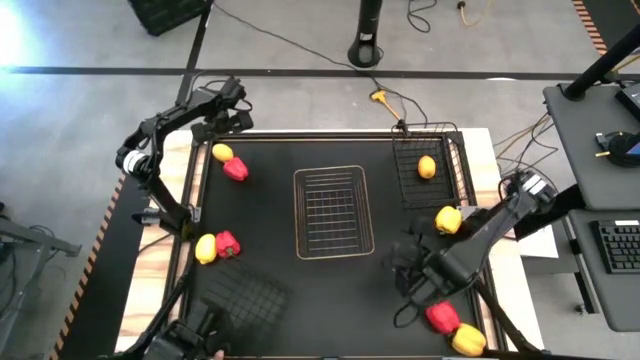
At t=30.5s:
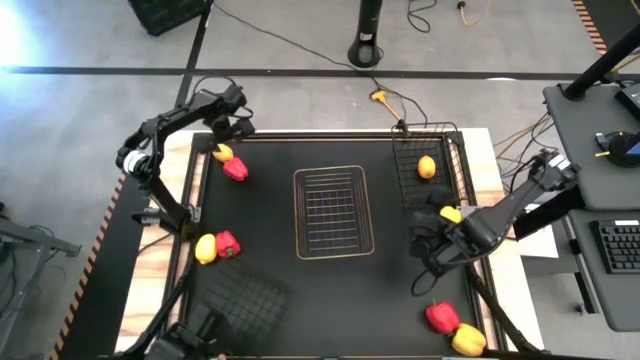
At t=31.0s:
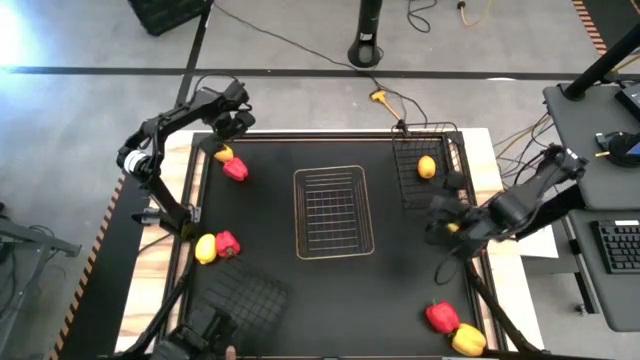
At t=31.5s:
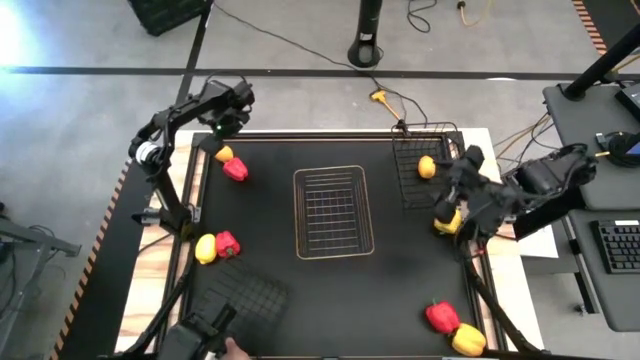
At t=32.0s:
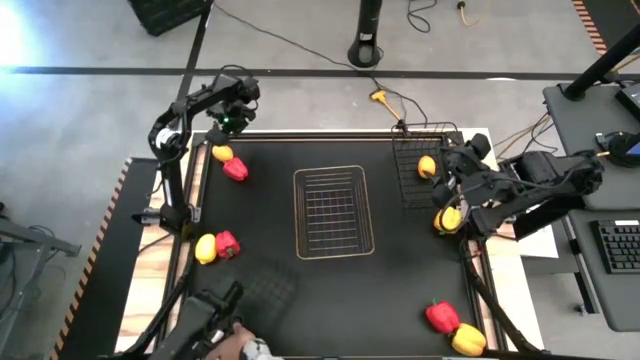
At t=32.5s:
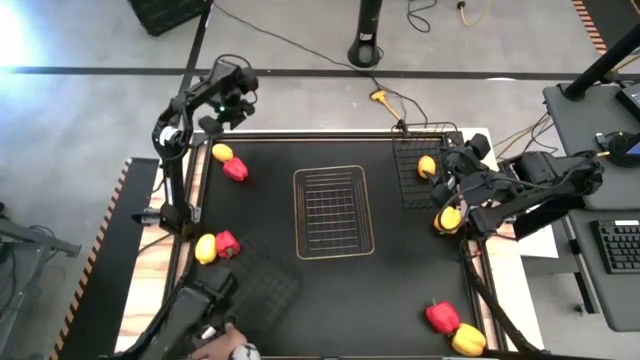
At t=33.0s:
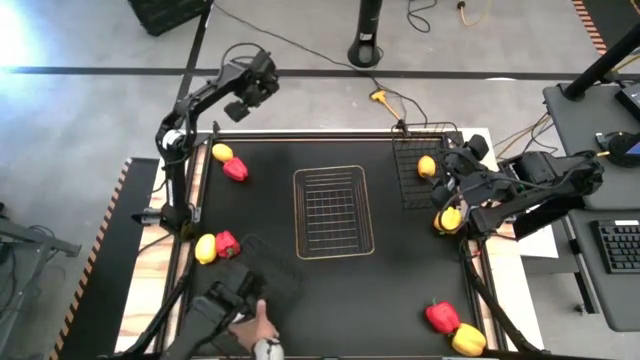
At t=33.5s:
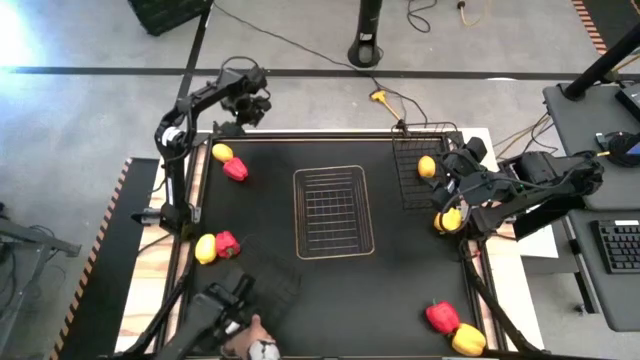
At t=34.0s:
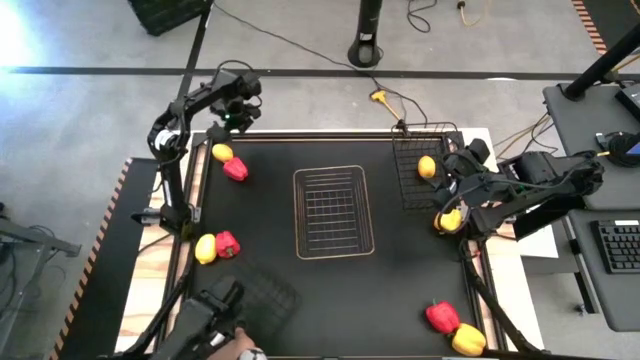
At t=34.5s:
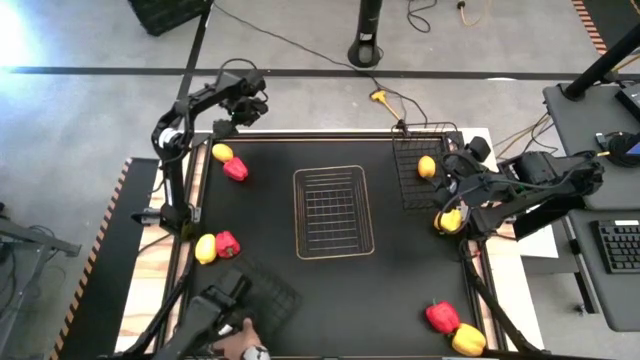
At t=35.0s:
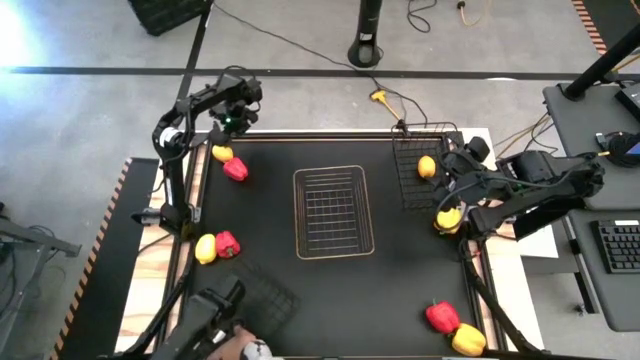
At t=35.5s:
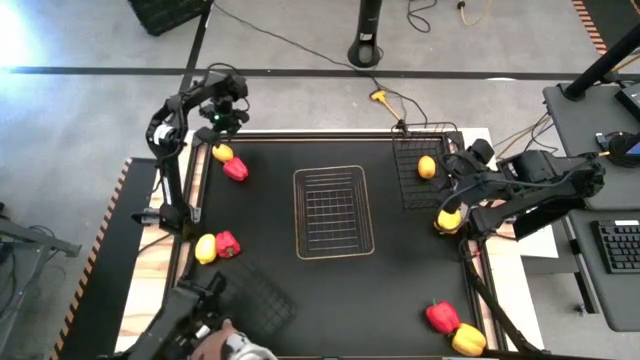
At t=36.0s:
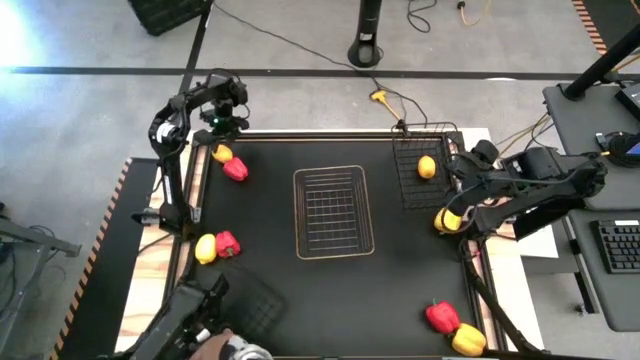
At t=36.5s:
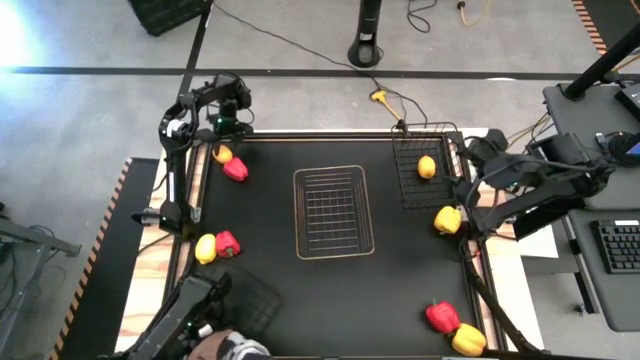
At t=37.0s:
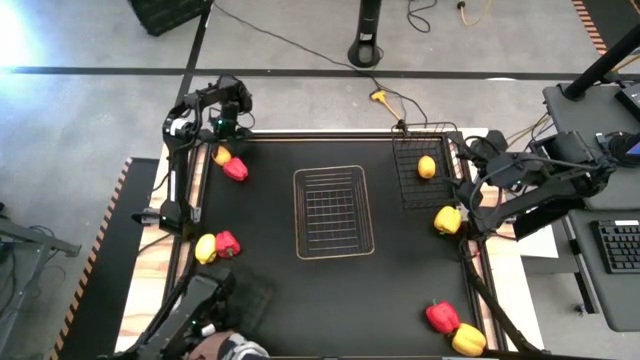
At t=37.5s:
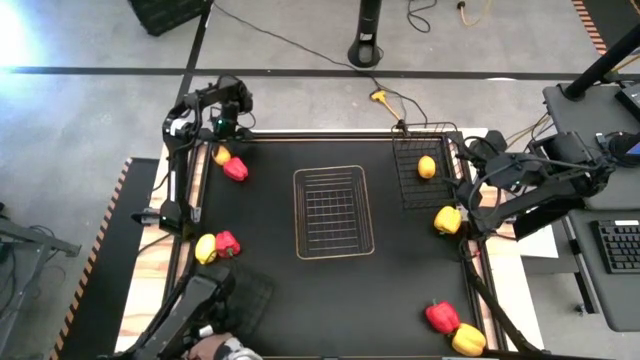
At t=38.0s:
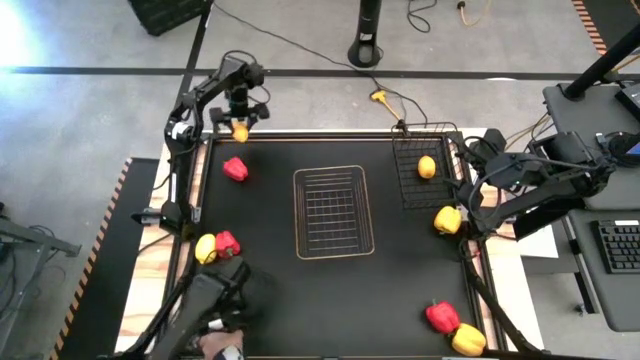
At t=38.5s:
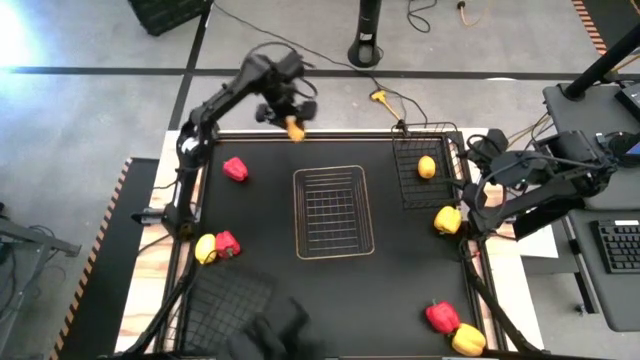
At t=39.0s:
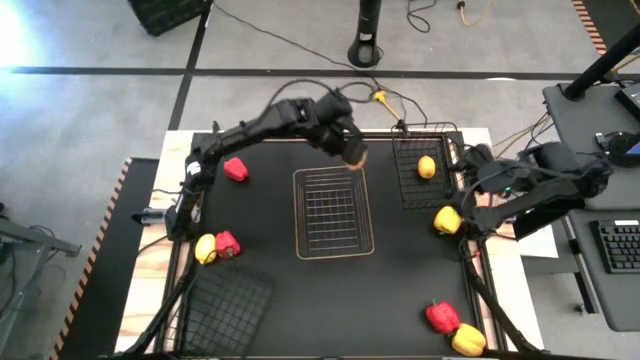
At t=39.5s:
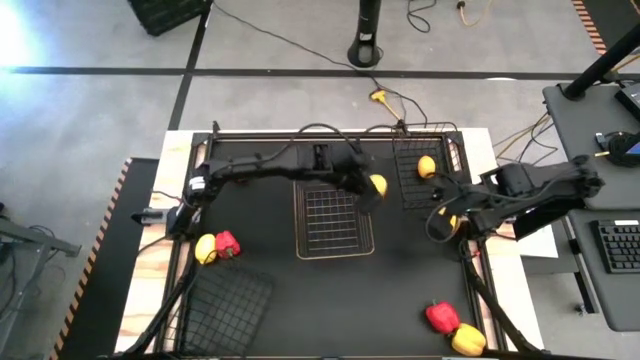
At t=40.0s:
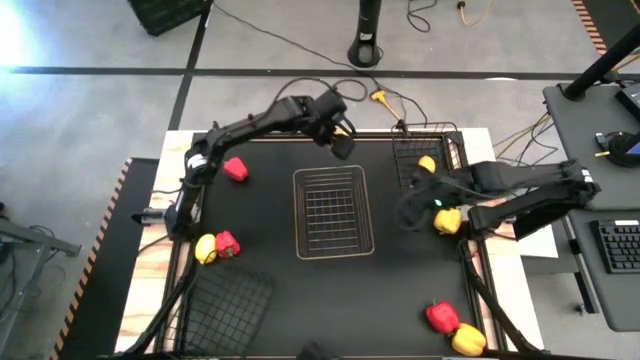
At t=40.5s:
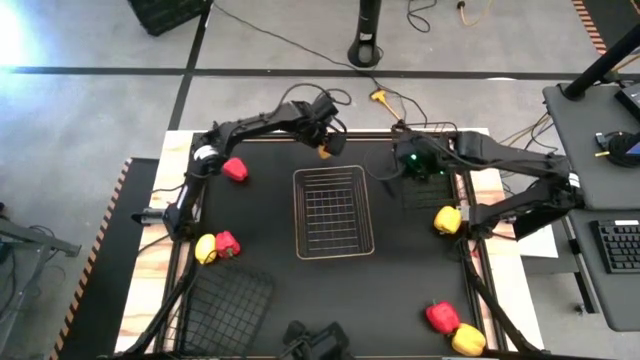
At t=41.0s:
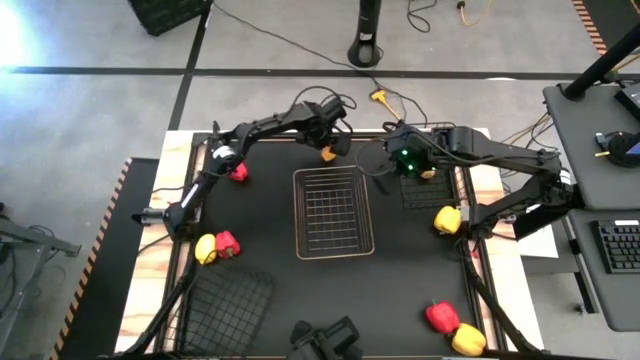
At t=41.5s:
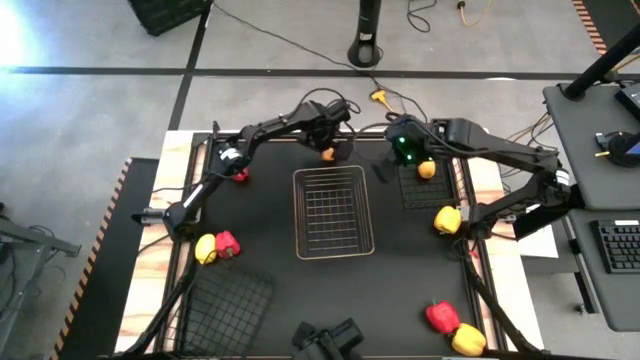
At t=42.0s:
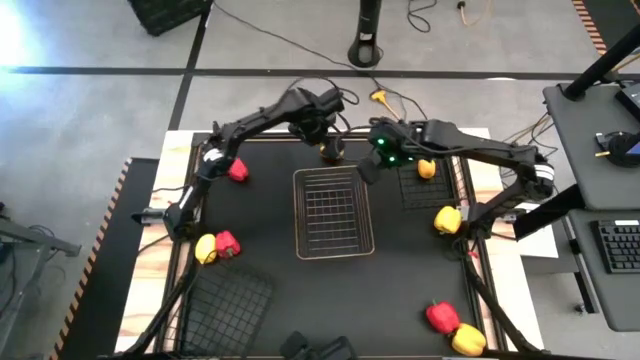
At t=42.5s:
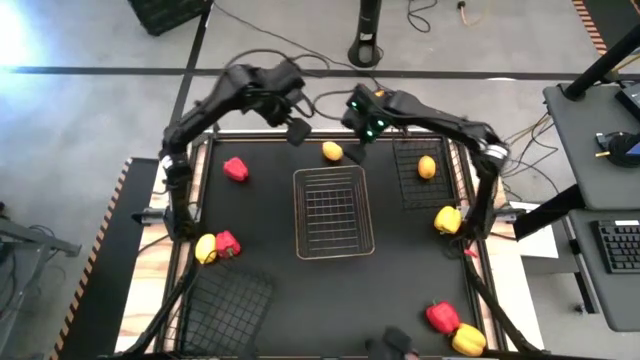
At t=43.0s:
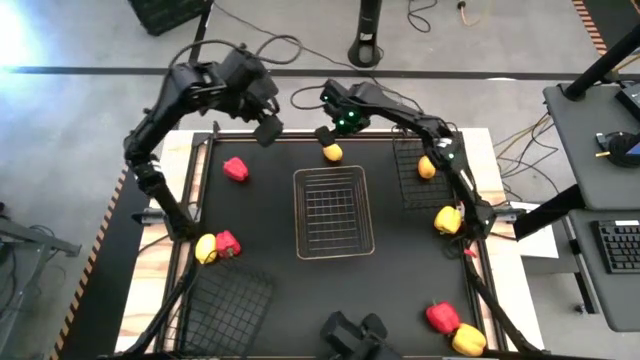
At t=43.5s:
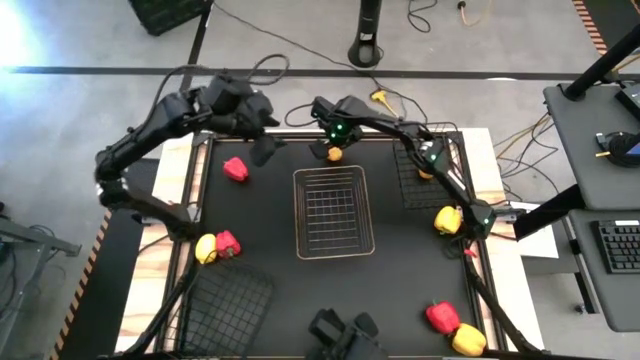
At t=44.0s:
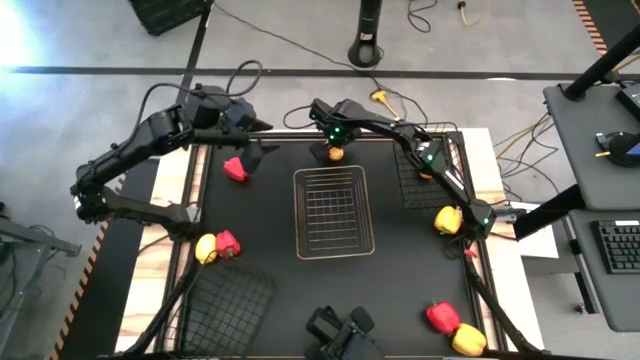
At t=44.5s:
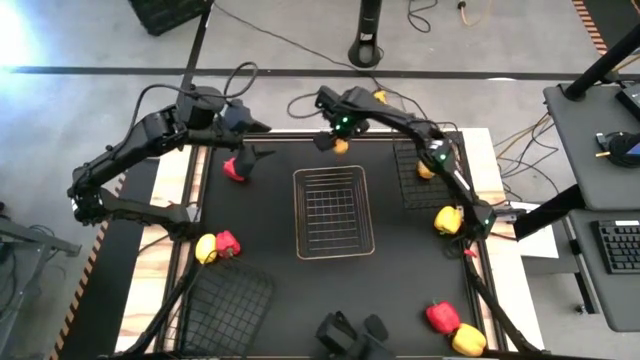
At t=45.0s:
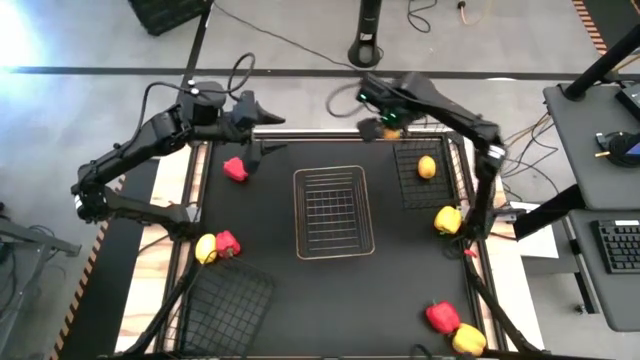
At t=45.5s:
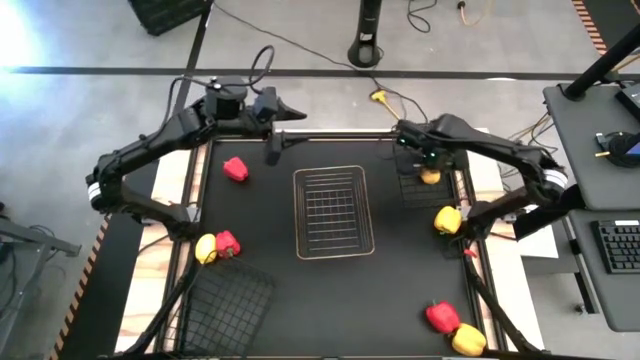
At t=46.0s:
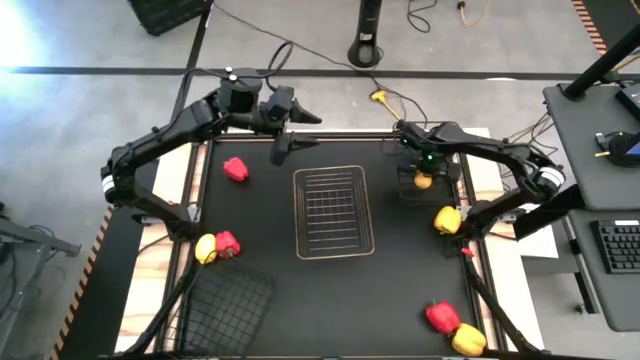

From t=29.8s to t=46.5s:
Task: Sort produce into baskets
Put the top lemon into the top black wire basket

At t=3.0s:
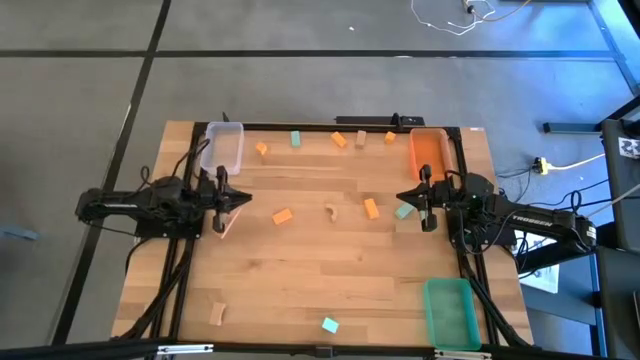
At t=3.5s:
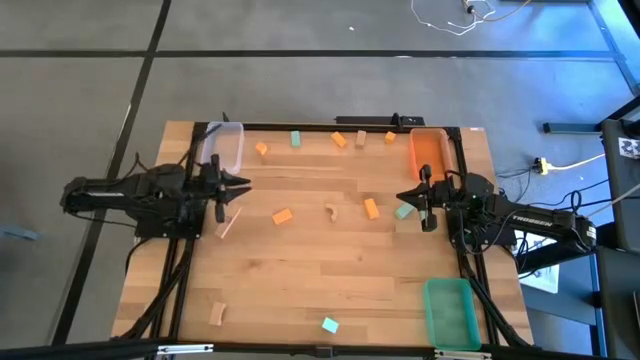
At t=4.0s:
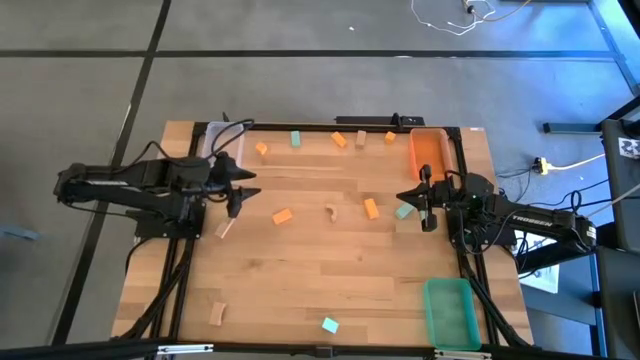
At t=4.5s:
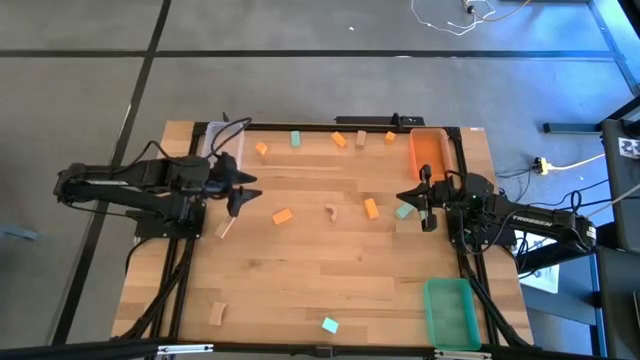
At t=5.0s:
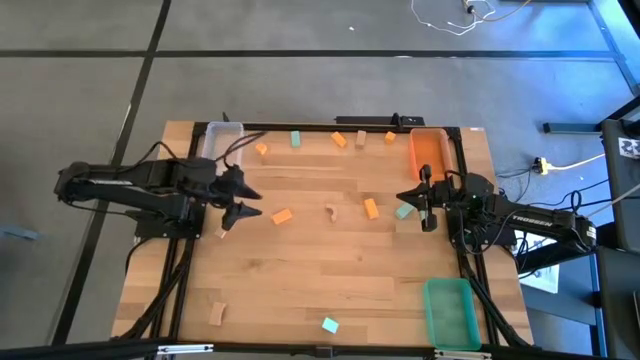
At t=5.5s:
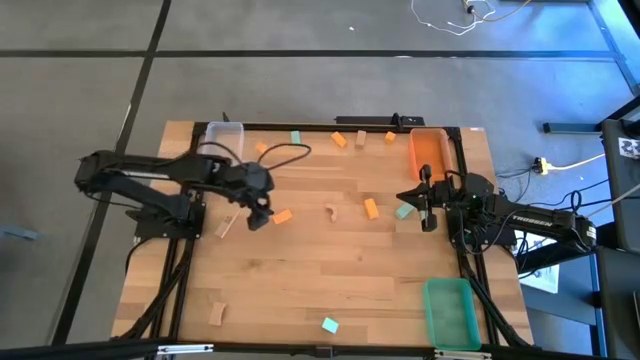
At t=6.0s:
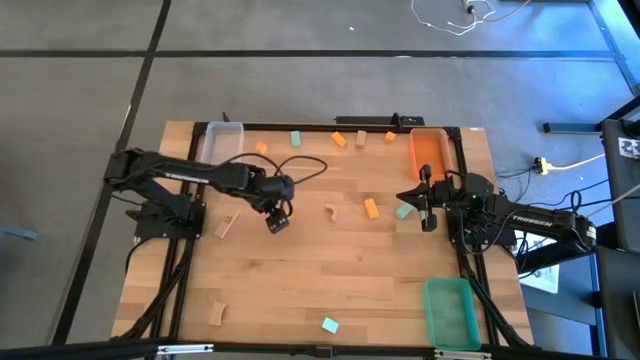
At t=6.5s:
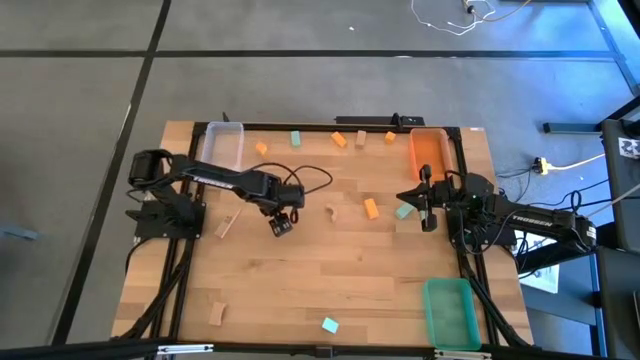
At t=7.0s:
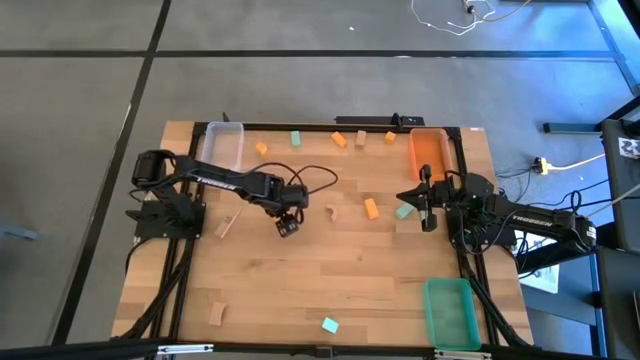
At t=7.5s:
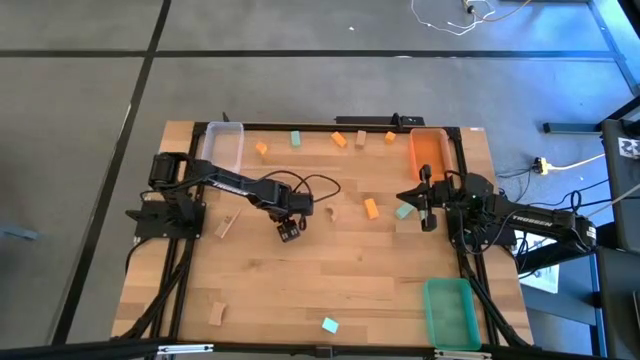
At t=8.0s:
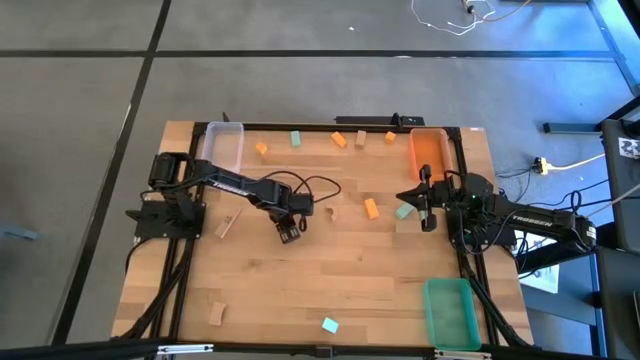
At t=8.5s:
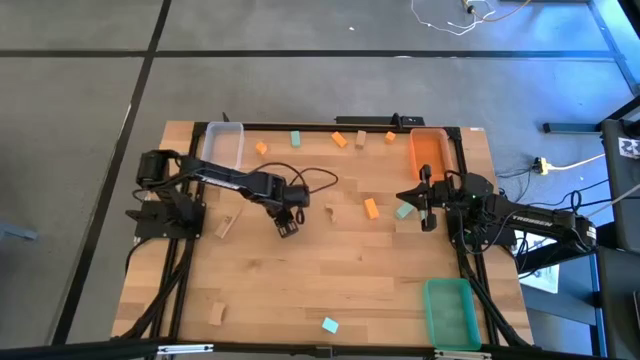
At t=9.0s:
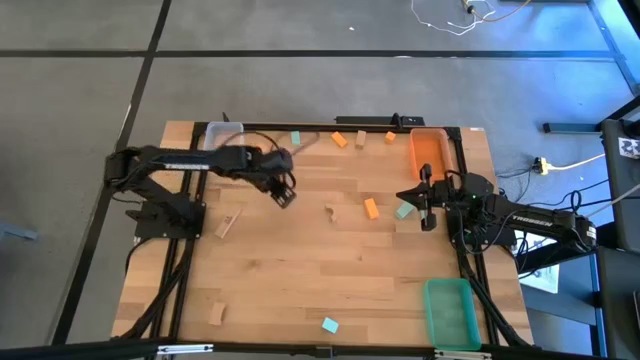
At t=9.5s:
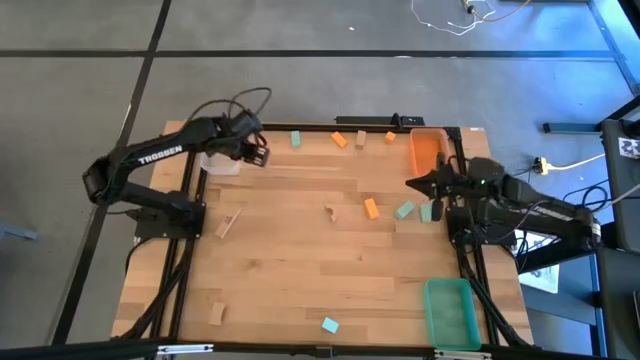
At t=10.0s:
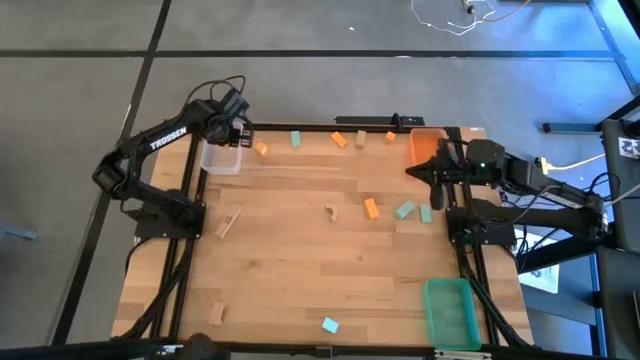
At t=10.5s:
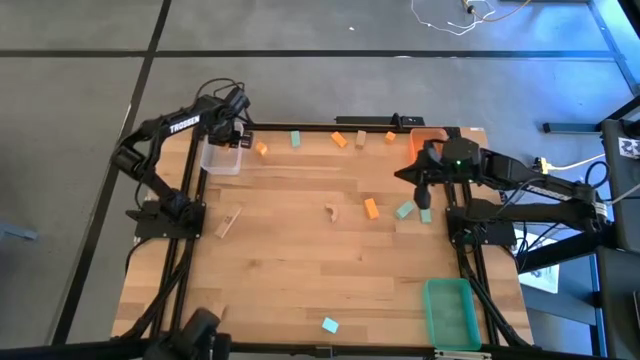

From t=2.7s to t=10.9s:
Task: Sort & place blocks by color
Put the orange block into the transparent bin
